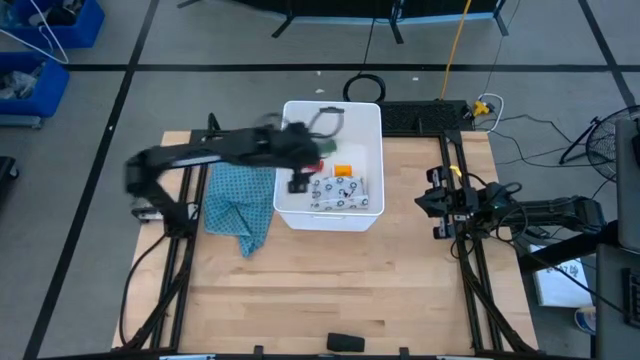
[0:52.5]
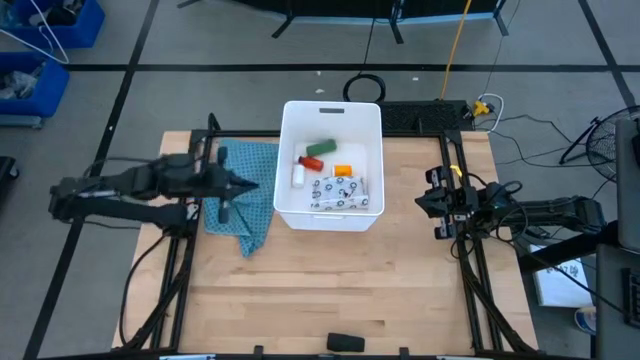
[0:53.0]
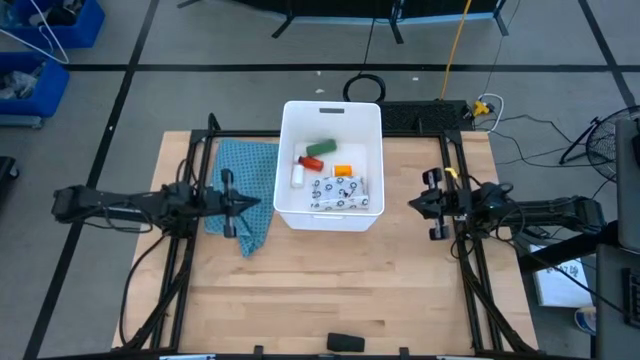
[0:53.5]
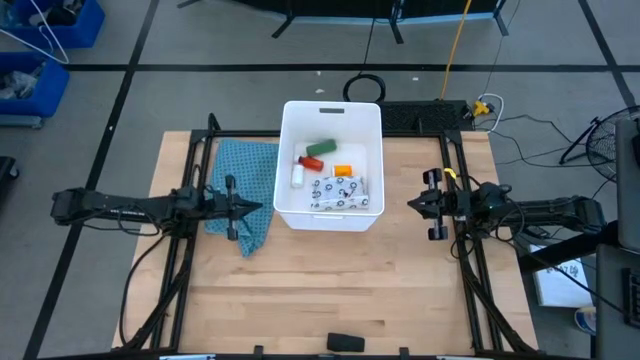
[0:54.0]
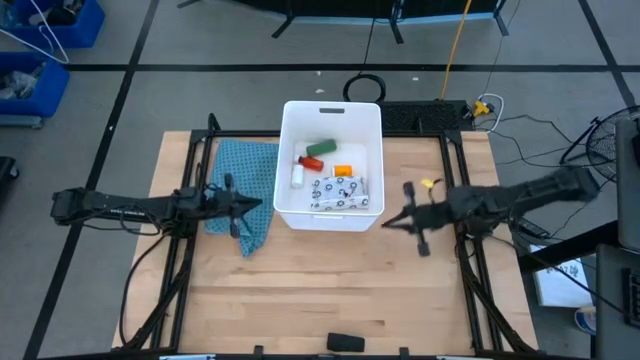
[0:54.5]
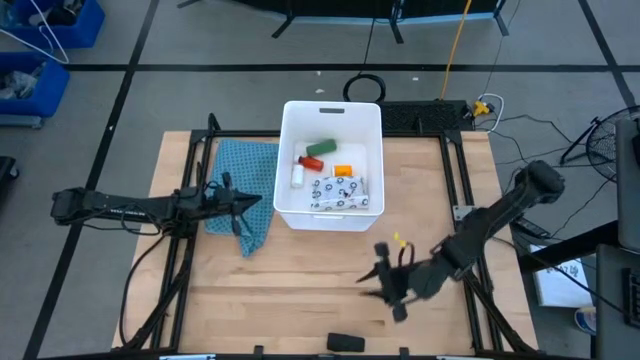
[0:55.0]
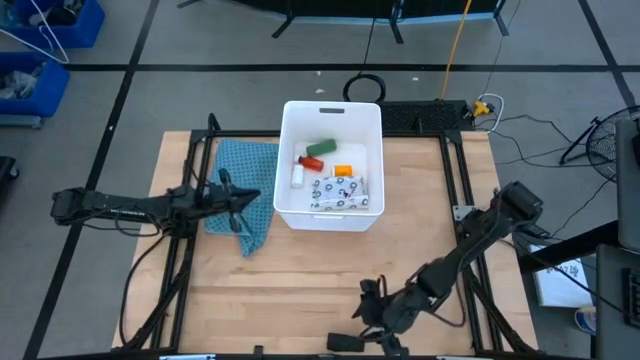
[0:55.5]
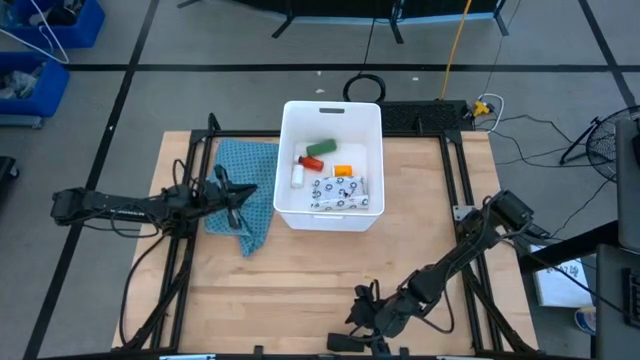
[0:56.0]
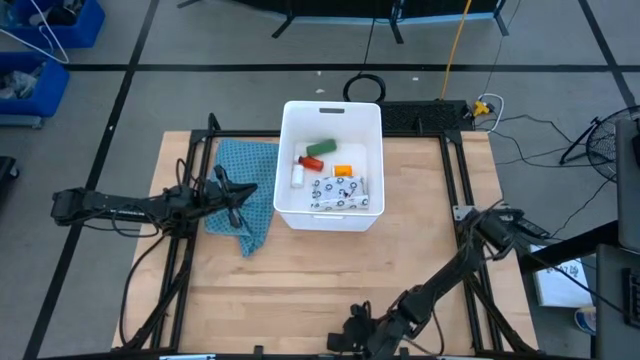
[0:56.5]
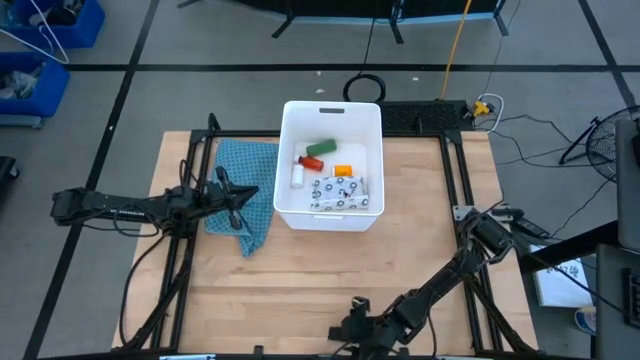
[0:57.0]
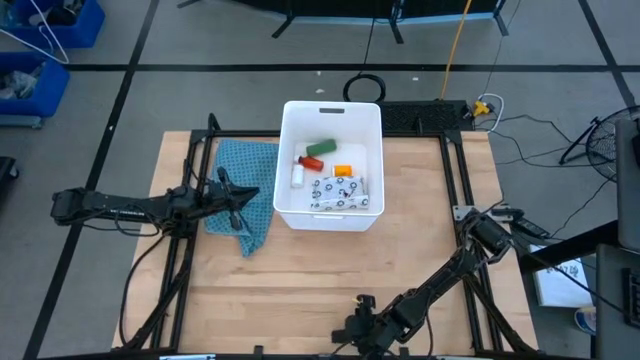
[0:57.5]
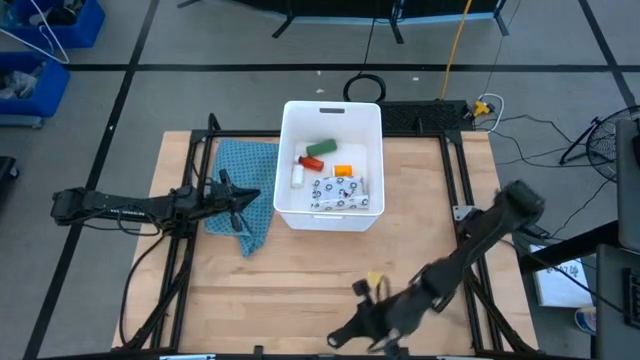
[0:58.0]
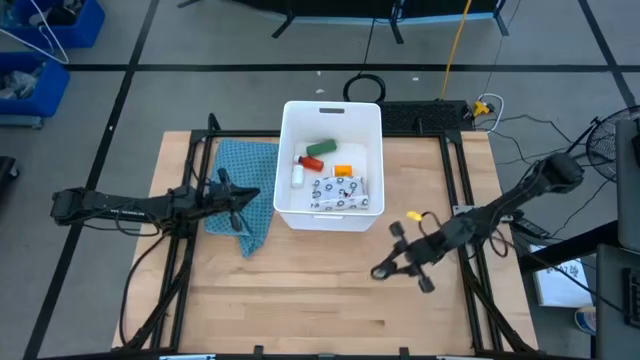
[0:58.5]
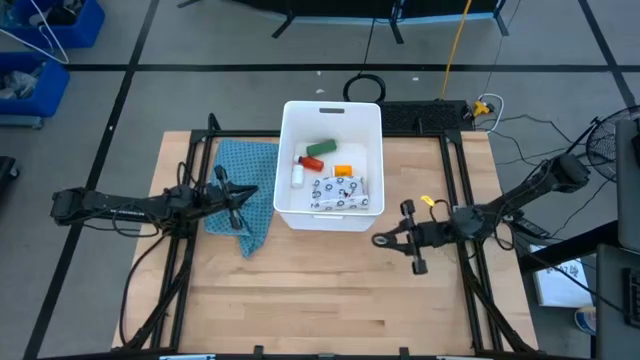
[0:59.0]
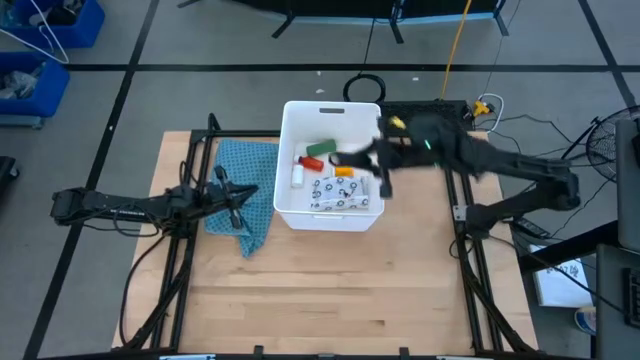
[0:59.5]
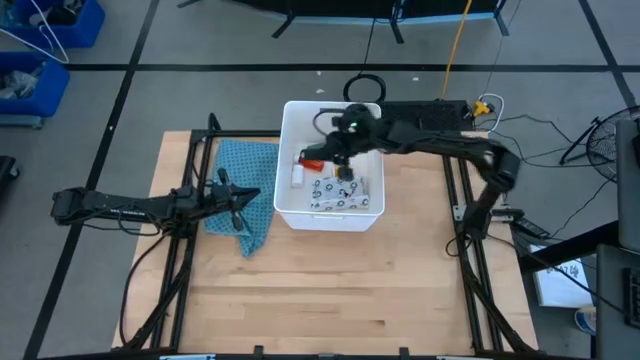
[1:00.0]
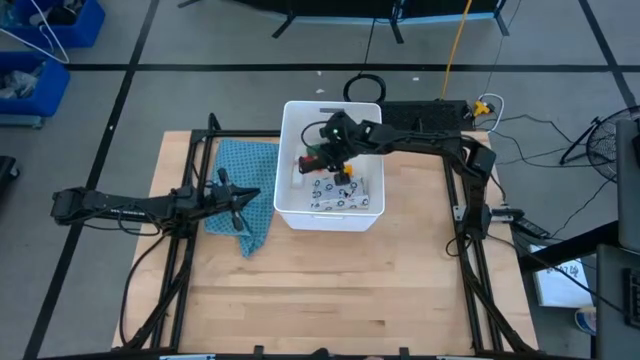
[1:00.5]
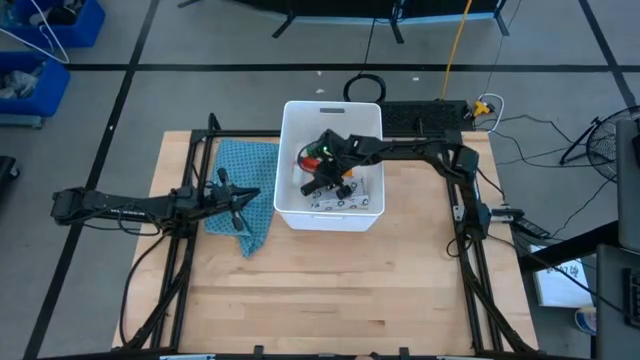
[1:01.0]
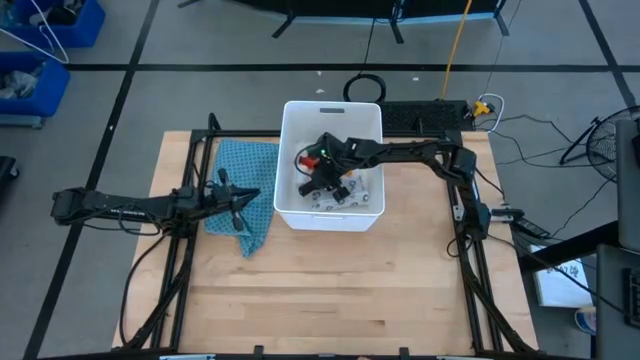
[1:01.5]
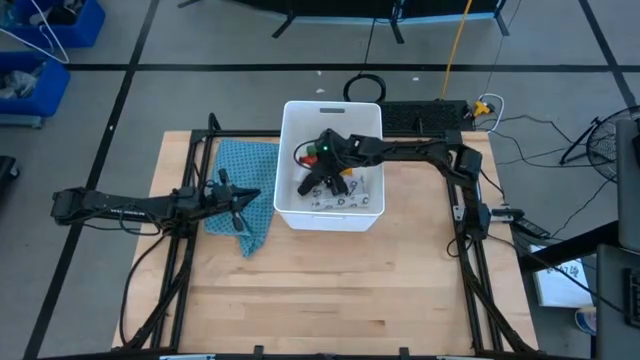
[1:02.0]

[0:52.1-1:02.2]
Task: Pick & place medical supplies in basket/bin
Put the black bandage into the white bin

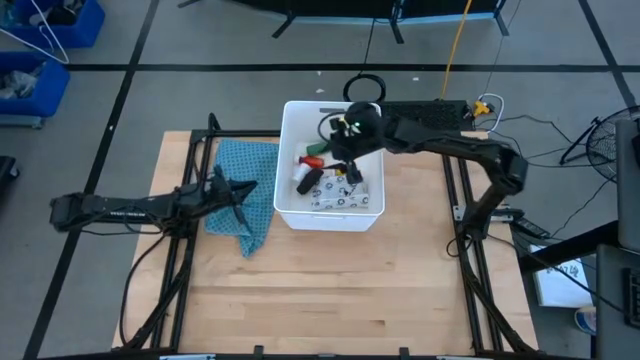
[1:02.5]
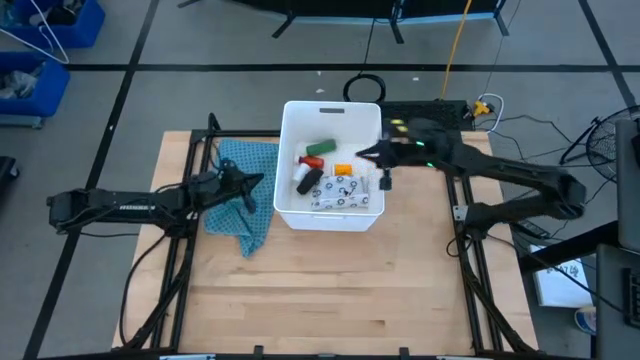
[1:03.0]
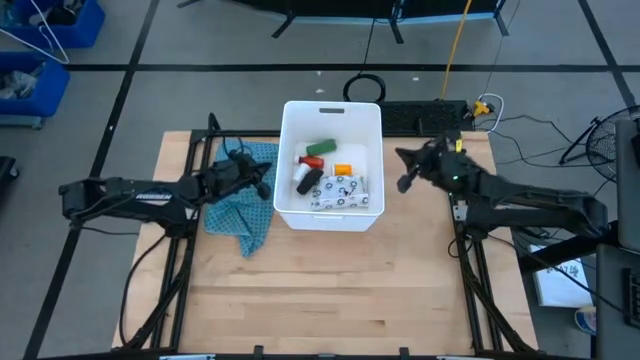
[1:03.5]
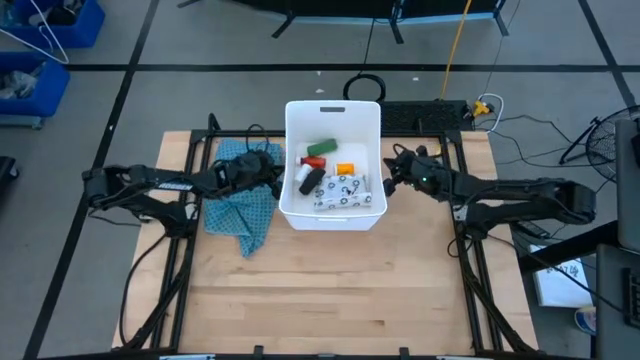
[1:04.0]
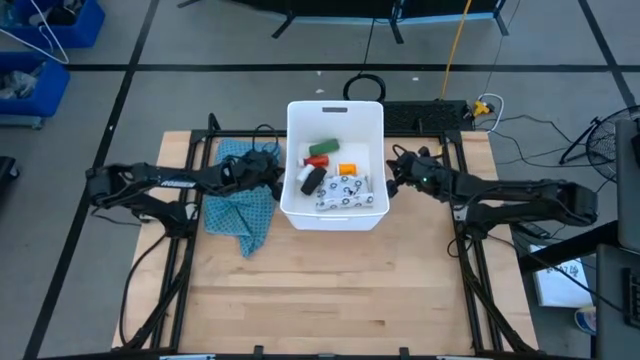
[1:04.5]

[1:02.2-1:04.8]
Adjust the white bin

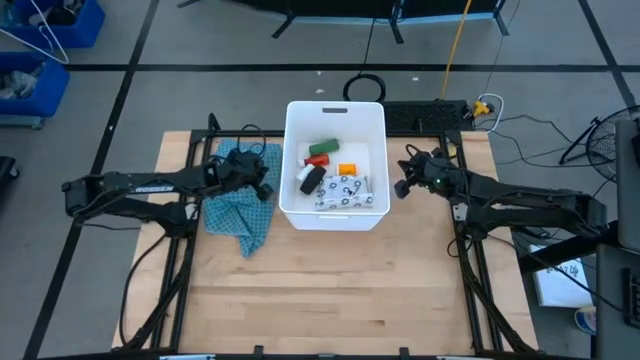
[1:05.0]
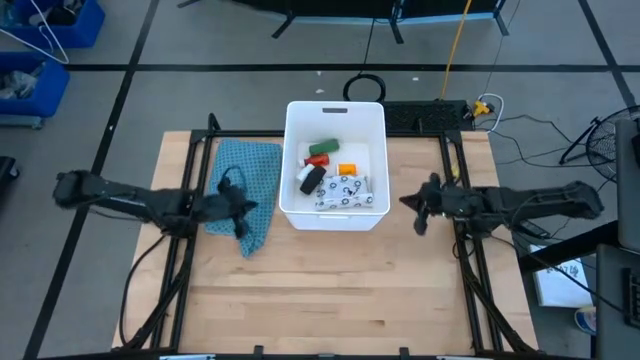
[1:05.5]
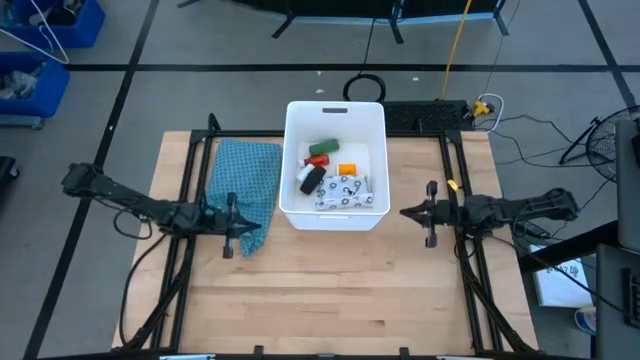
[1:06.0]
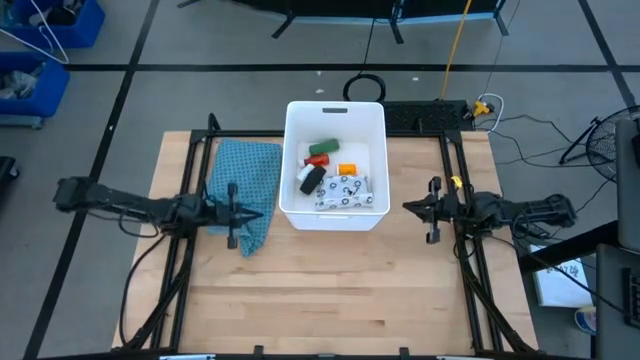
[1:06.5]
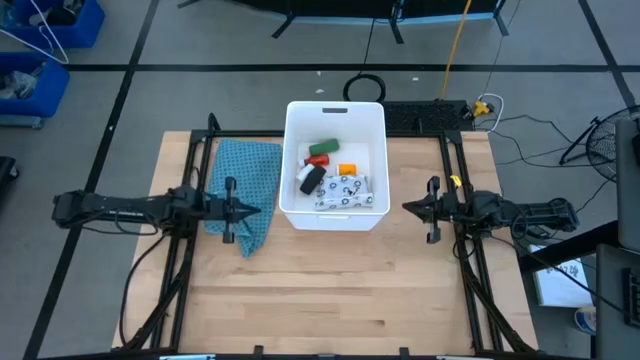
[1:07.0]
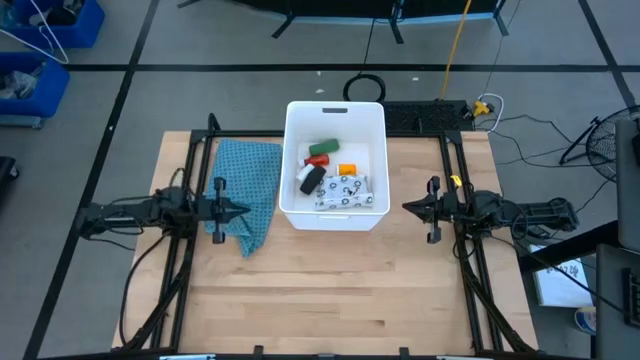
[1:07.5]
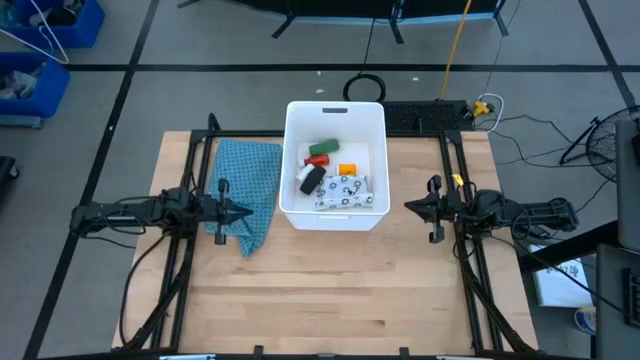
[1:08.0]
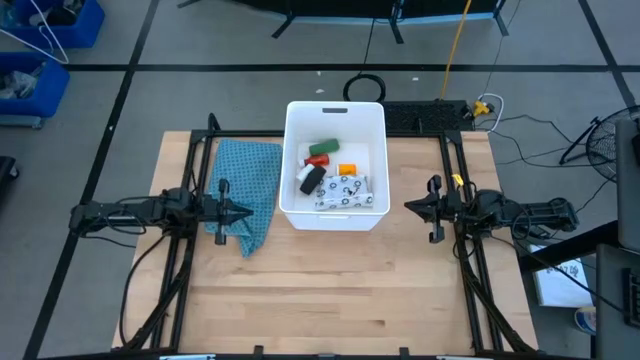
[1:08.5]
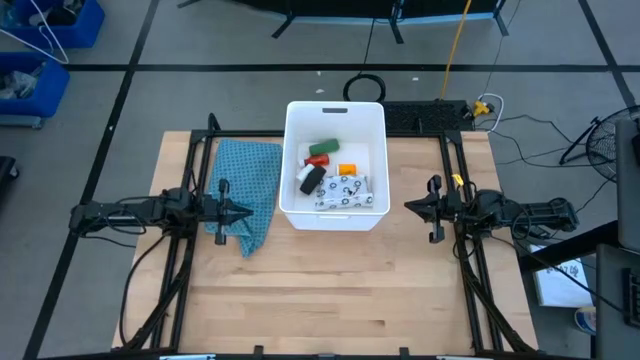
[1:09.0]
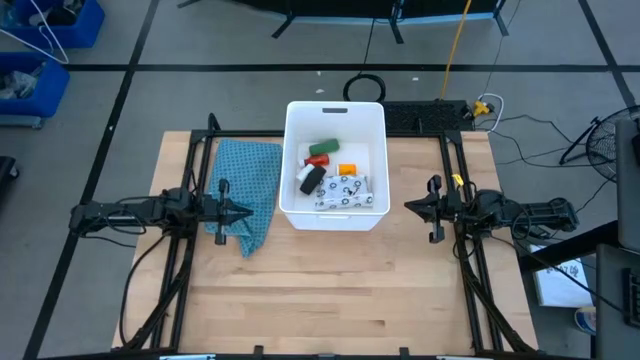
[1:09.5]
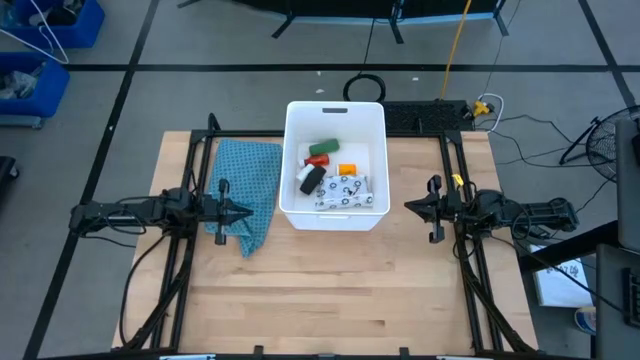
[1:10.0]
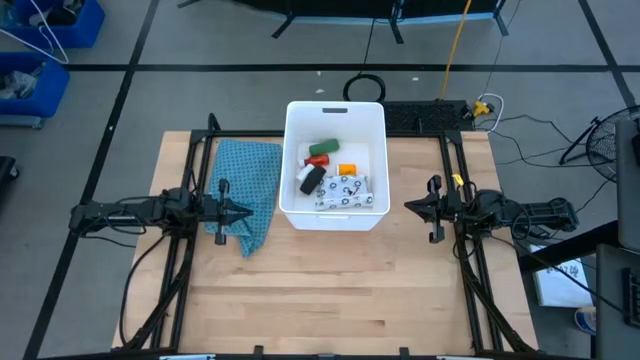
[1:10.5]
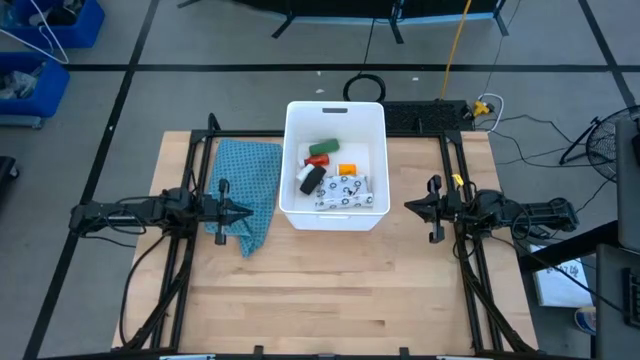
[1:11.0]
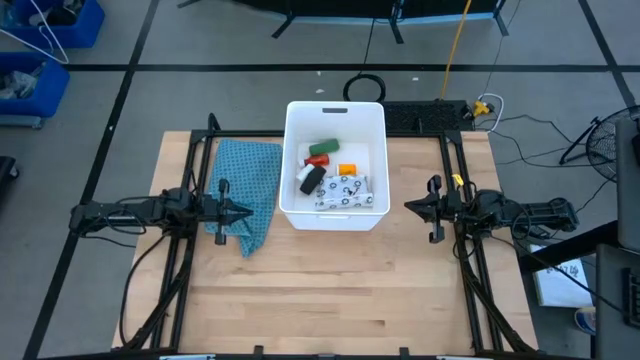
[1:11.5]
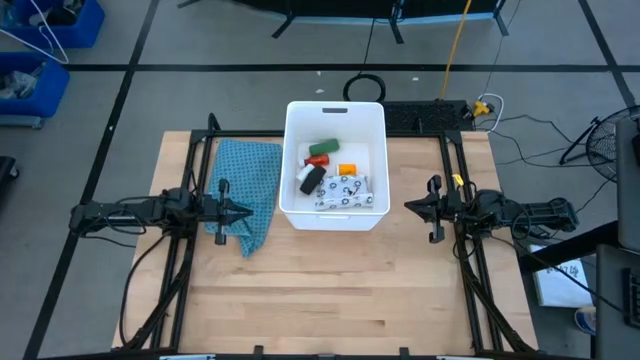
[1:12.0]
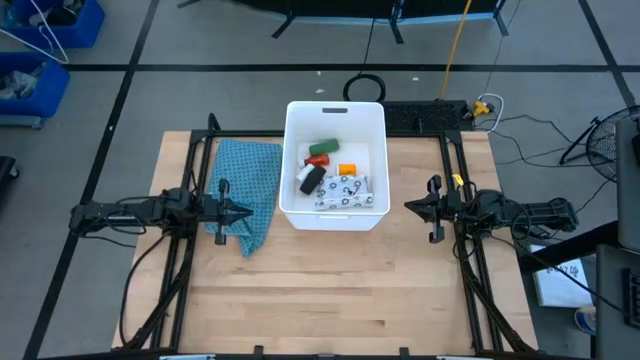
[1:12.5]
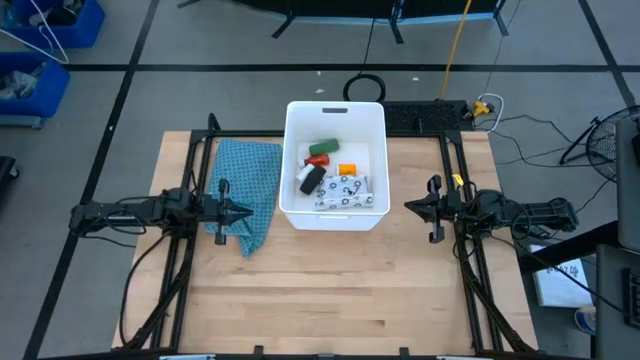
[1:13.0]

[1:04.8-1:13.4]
Return to Home Position
